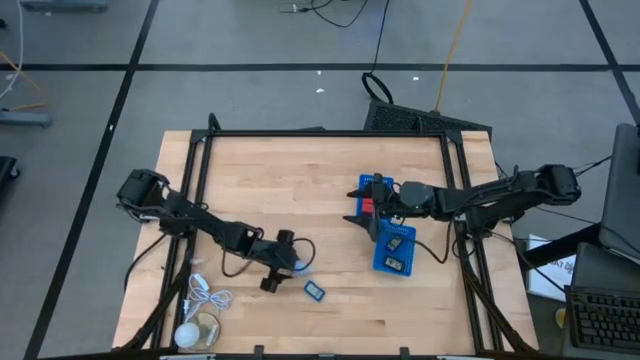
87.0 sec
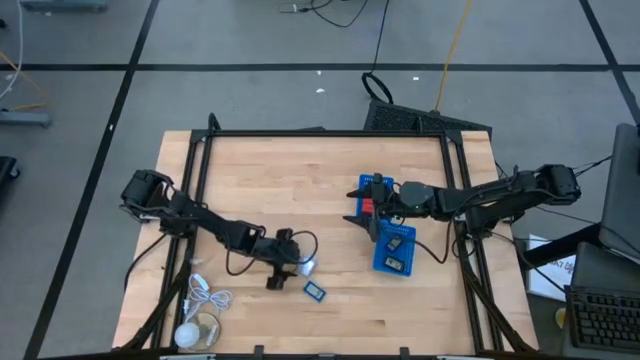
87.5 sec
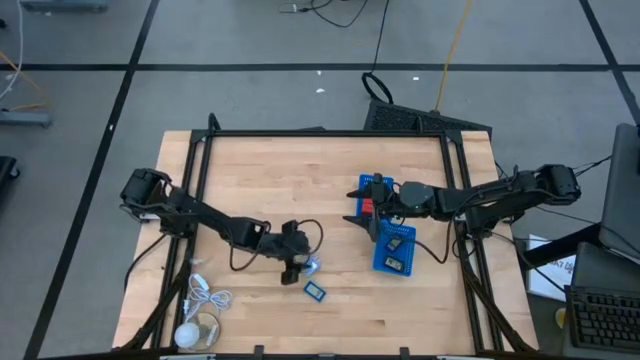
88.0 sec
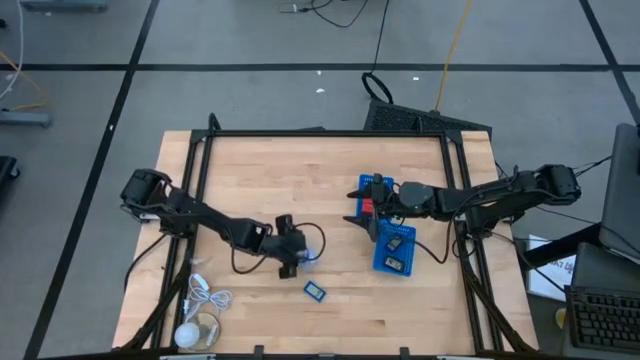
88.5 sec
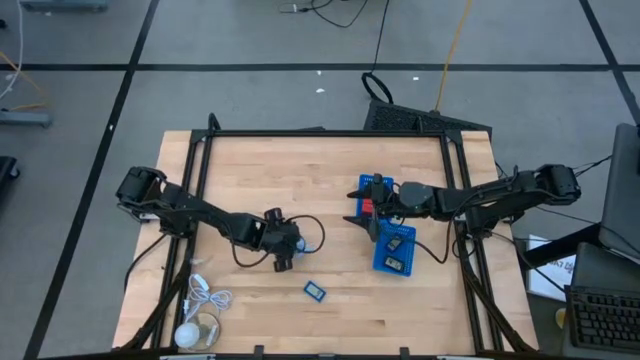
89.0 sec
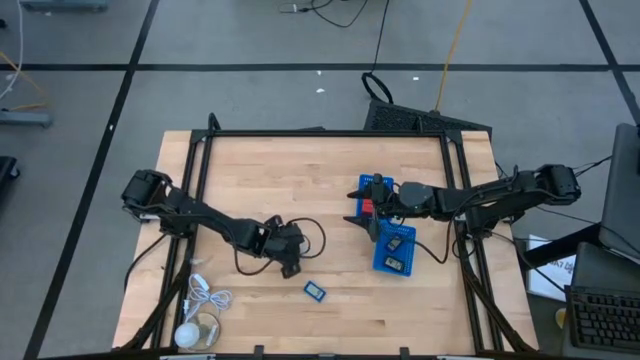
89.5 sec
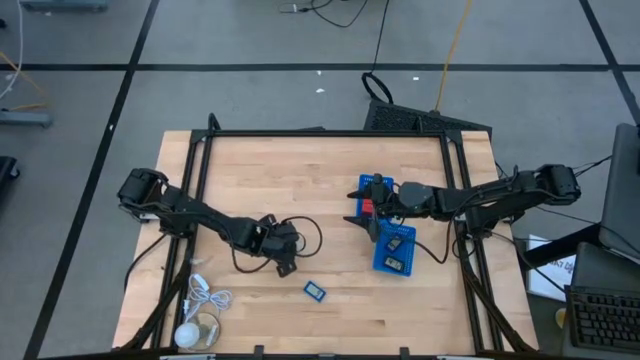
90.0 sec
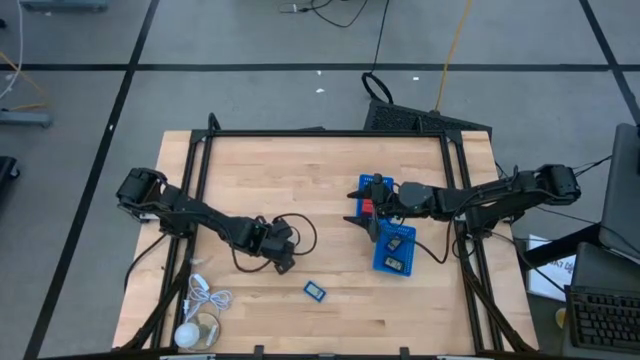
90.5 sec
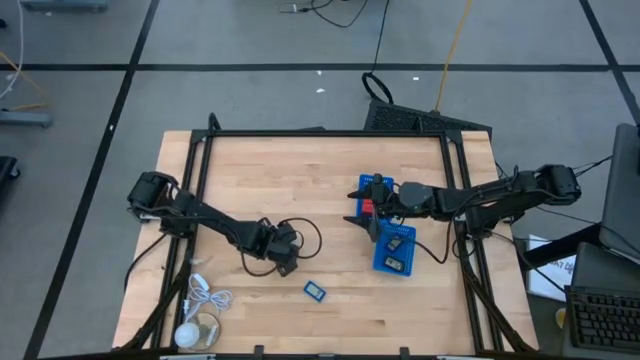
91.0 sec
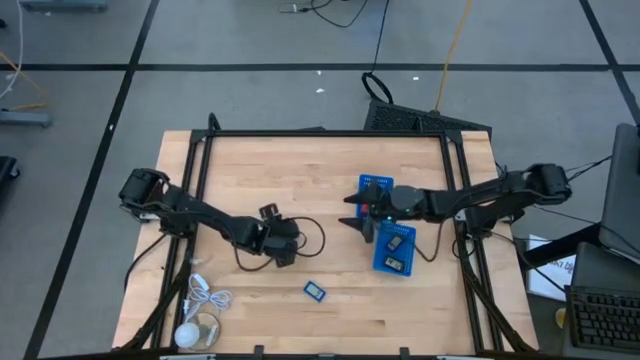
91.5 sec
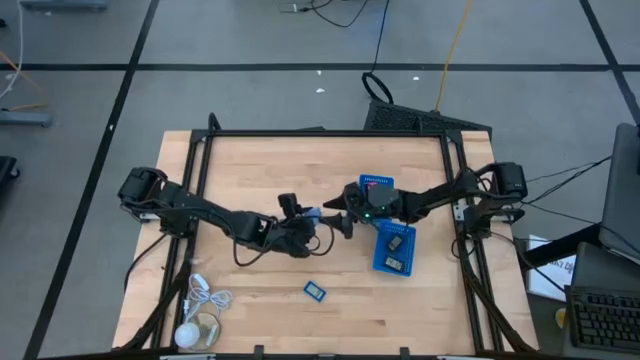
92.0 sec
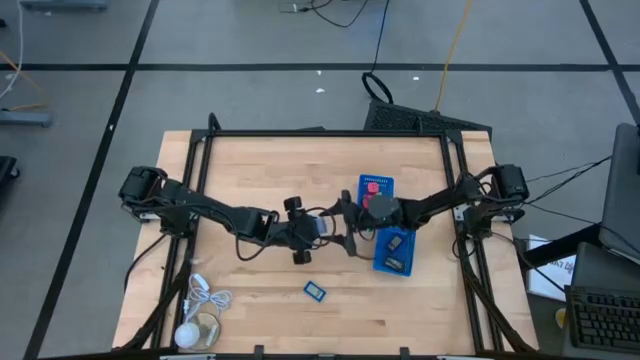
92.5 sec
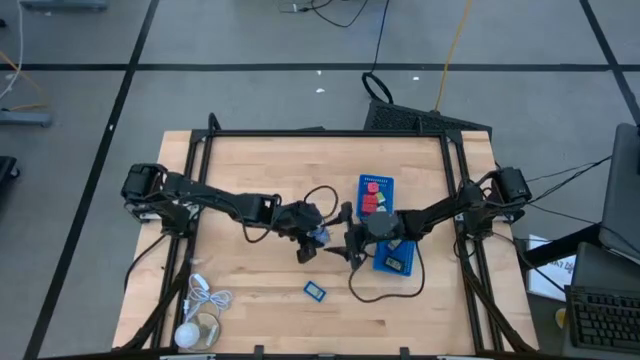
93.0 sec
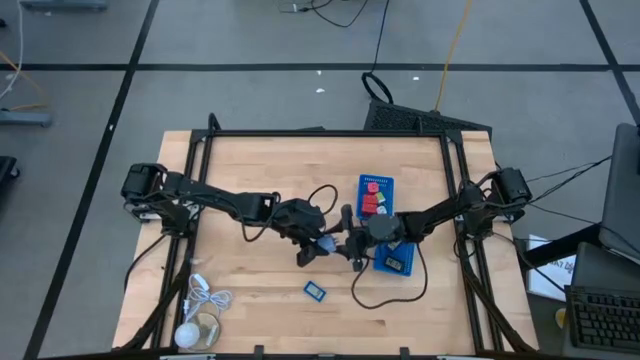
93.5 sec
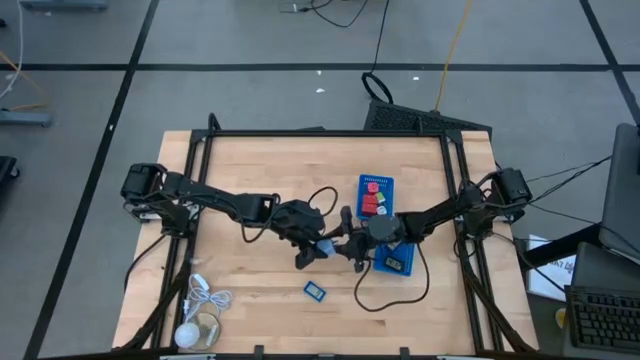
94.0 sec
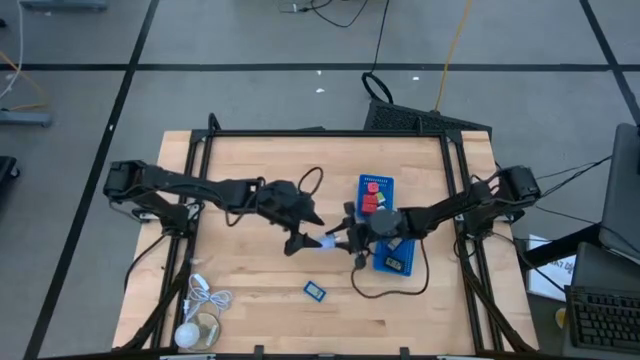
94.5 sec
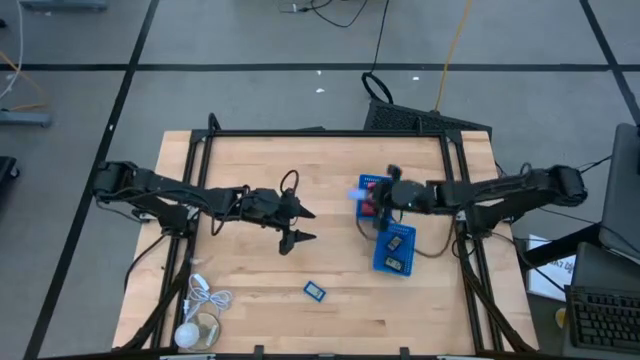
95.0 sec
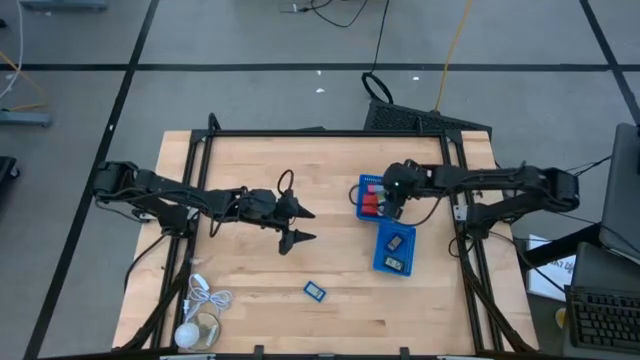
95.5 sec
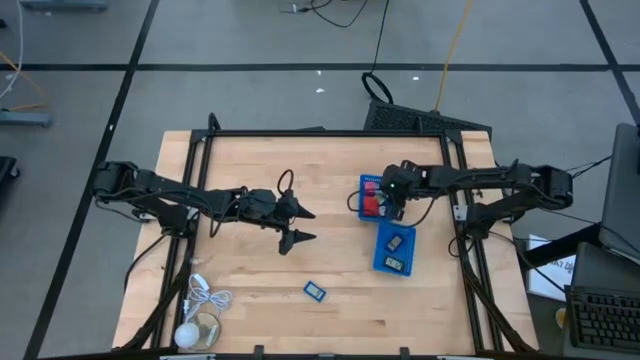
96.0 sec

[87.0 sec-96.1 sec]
Task: Pick & Place Office items
Put the light blue charger adapter into the top blue bin

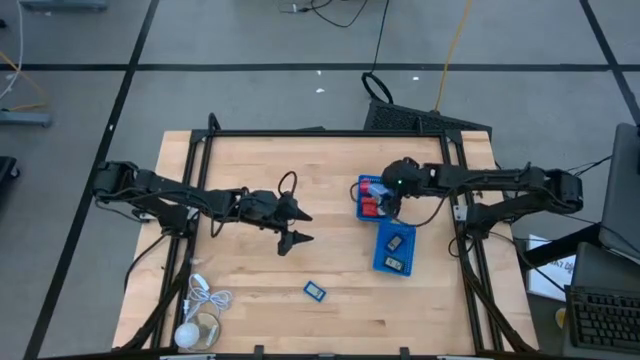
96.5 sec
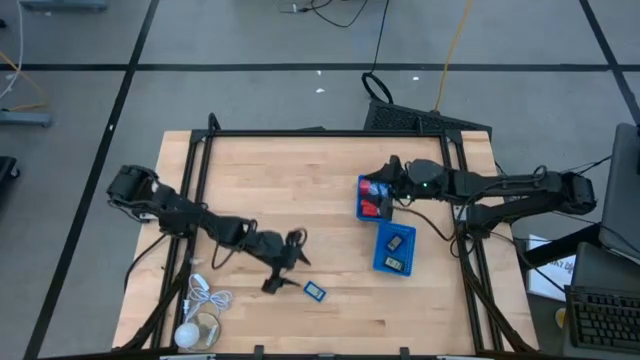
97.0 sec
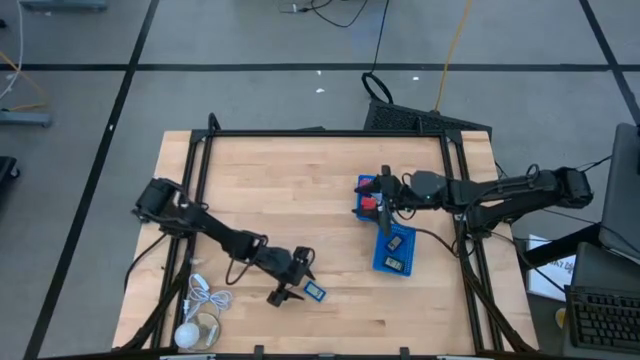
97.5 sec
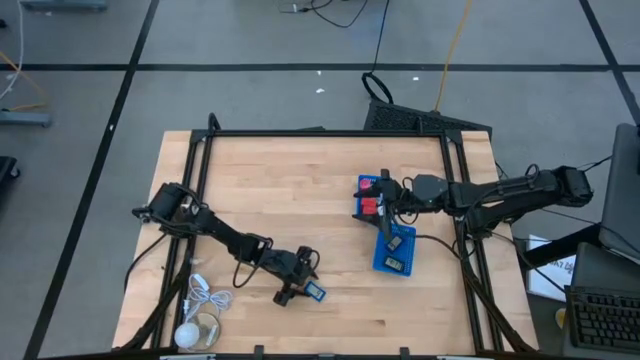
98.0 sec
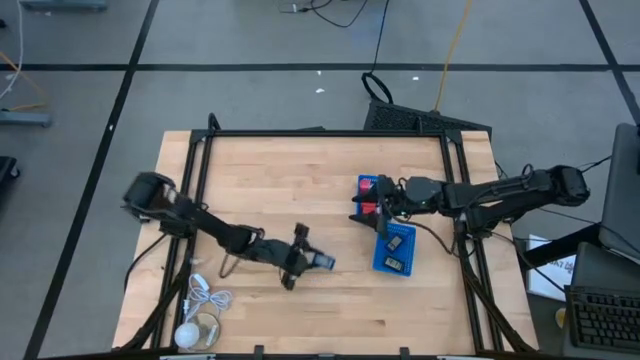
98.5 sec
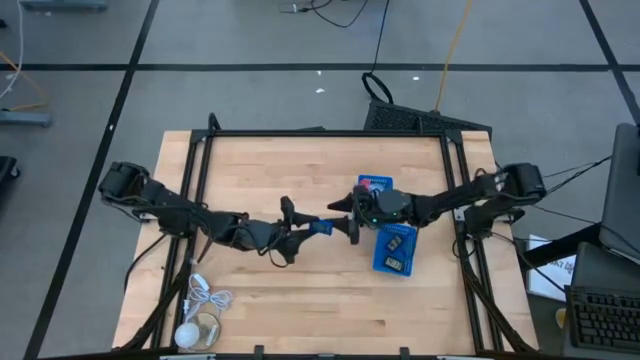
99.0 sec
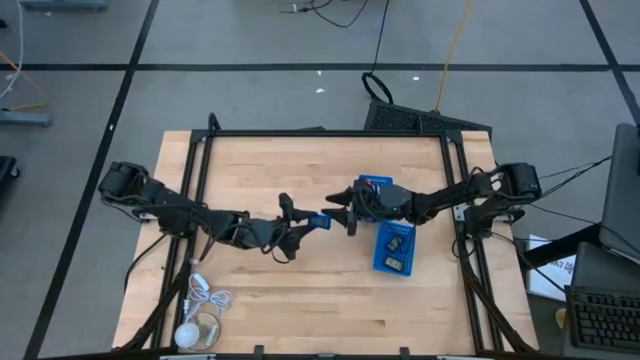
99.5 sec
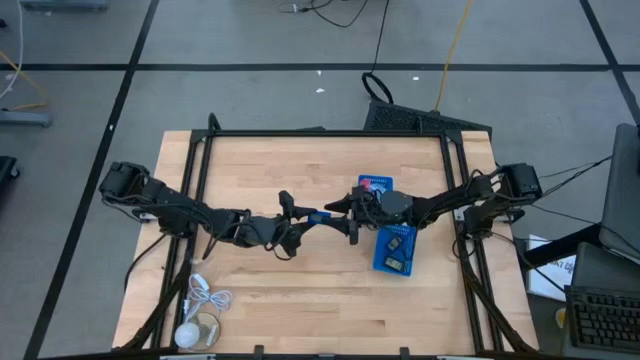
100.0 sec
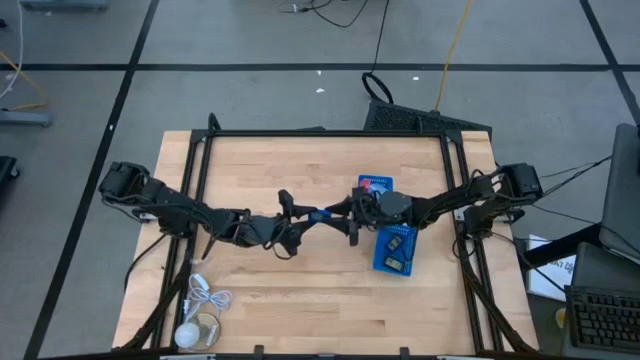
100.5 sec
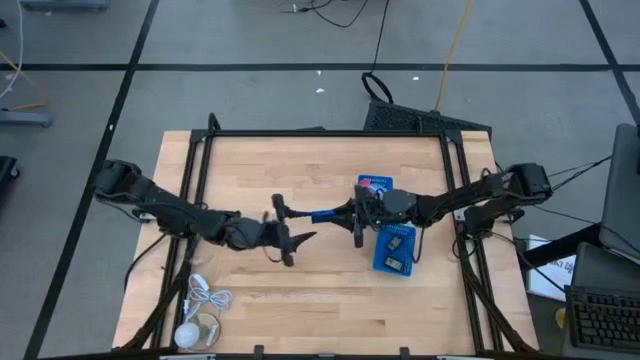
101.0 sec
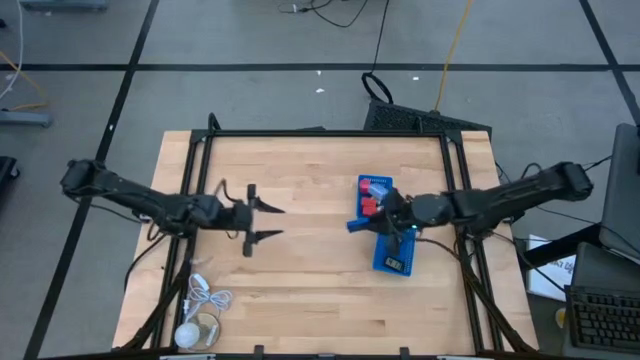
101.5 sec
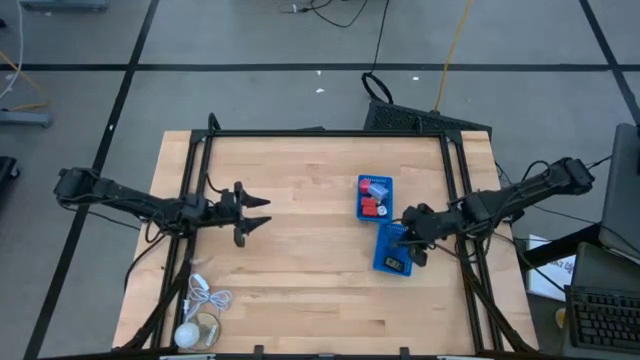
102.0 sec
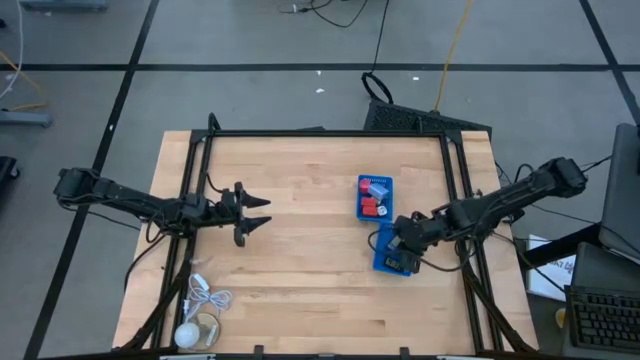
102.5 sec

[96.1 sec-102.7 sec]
Put the blue digital timer into the bottom blue bin

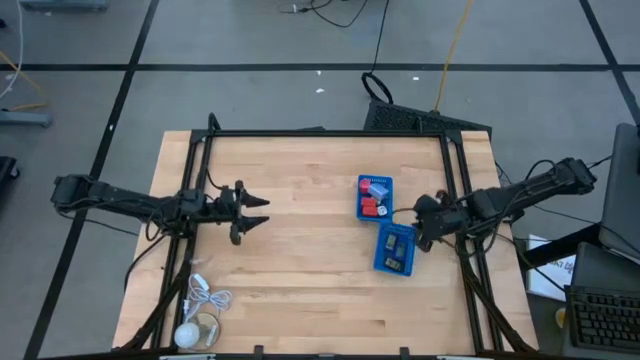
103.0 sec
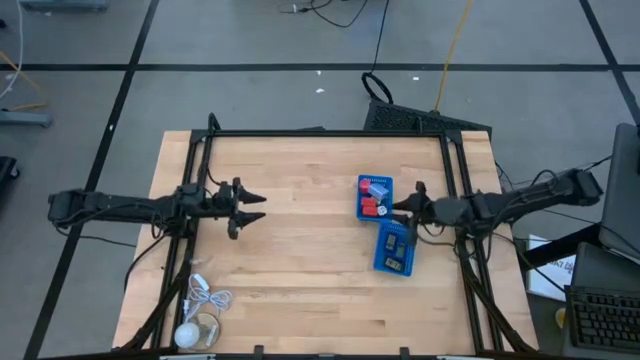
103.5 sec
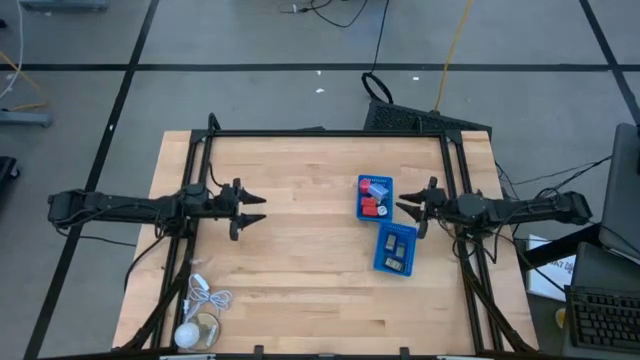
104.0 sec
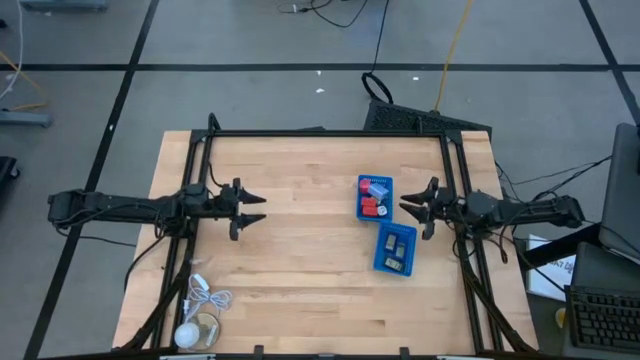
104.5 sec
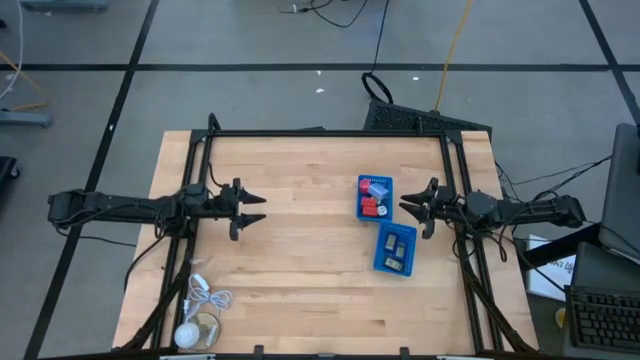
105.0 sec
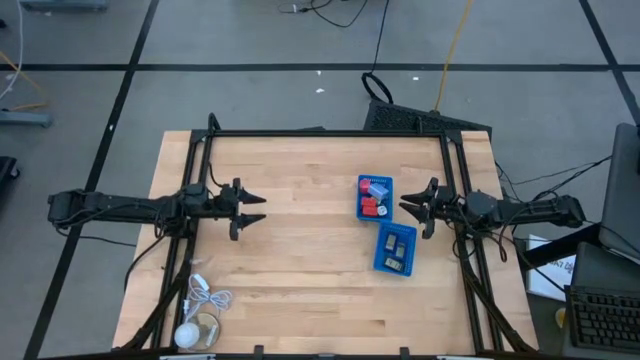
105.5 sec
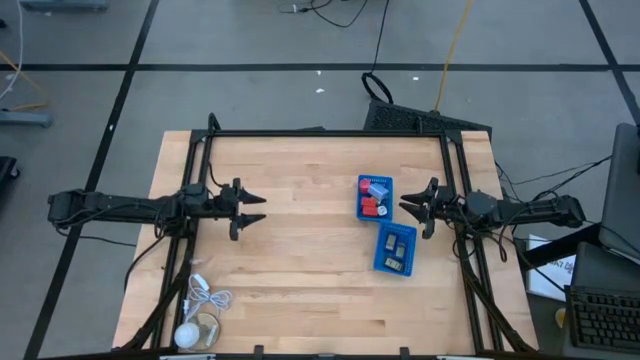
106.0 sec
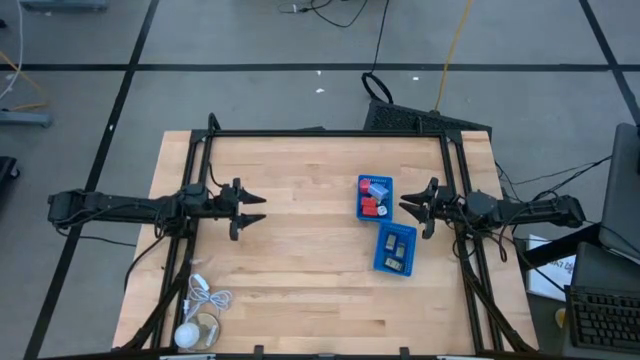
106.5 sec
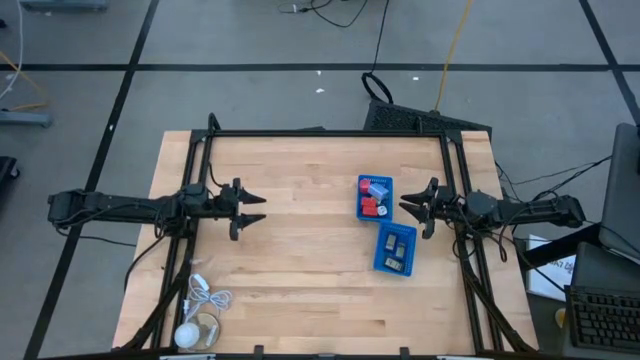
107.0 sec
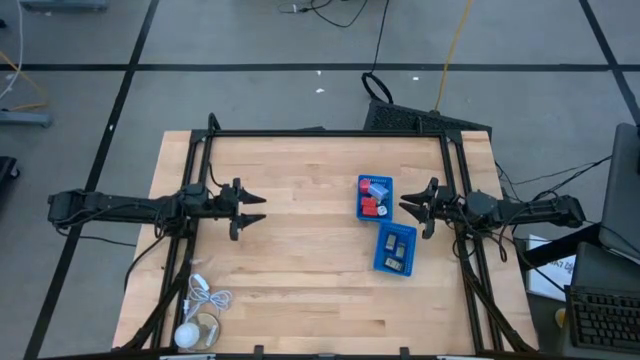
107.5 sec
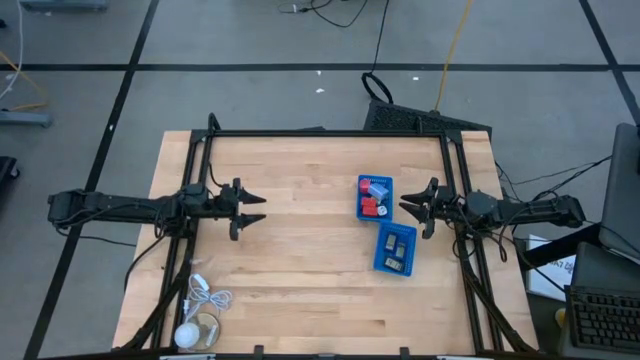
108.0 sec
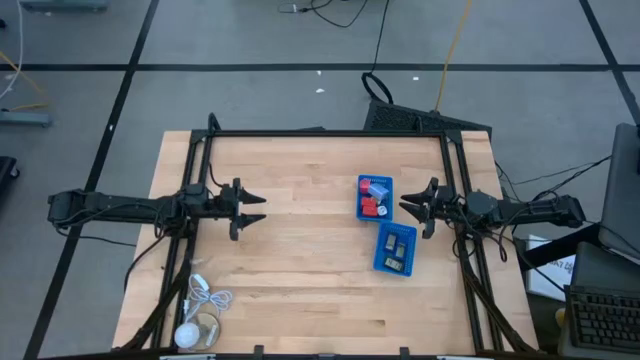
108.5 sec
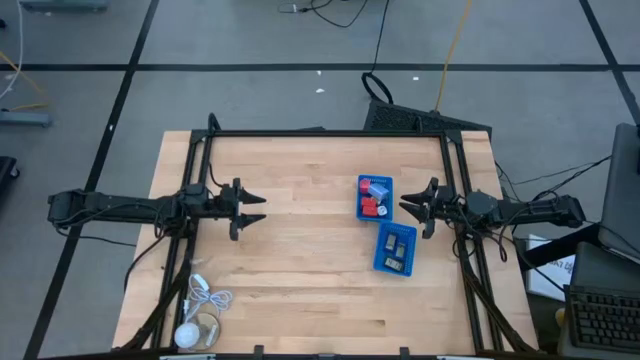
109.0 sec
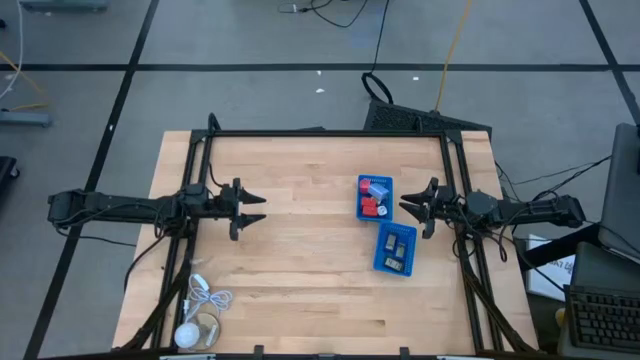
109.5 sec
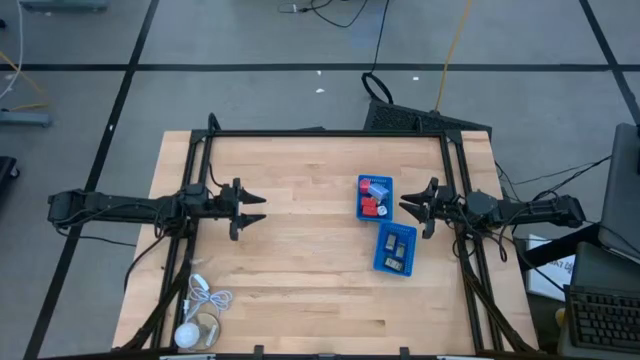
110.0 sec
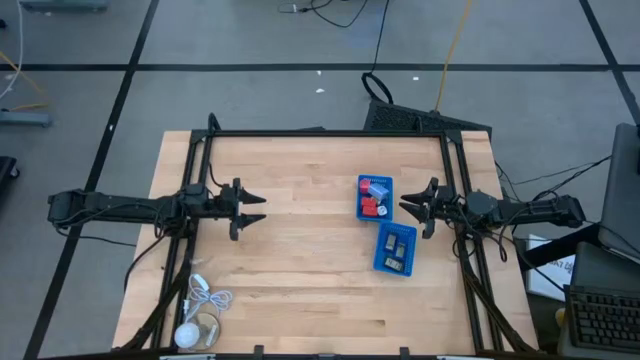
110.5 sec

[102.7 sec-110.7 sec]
Return to Home Position
